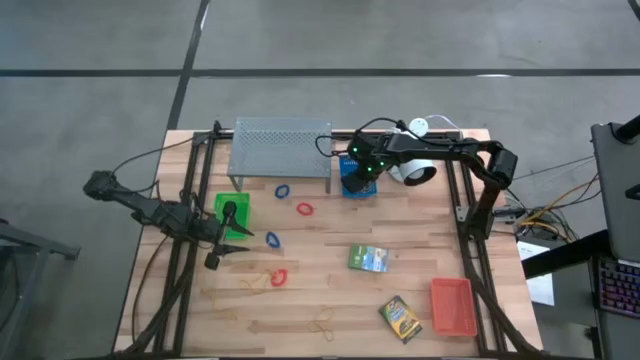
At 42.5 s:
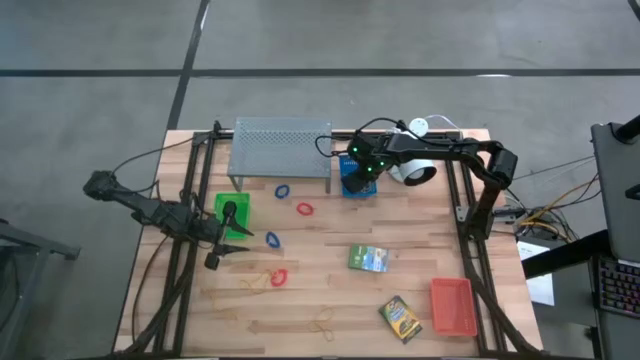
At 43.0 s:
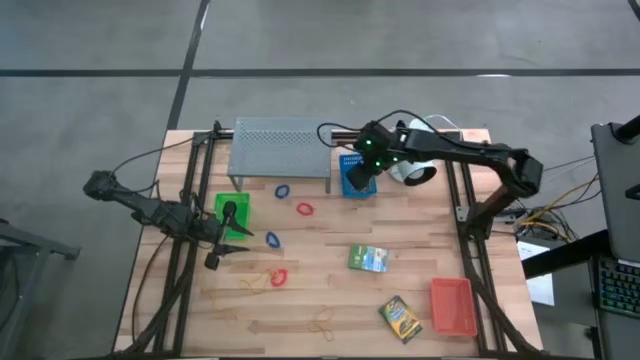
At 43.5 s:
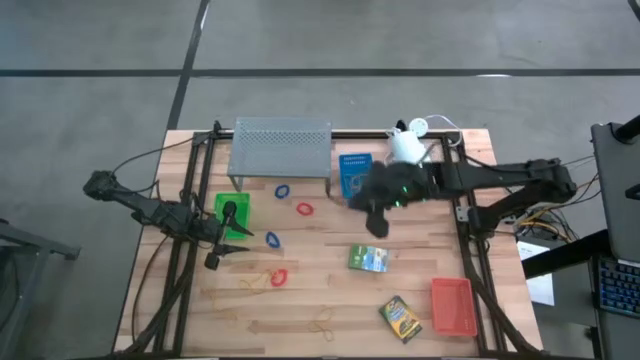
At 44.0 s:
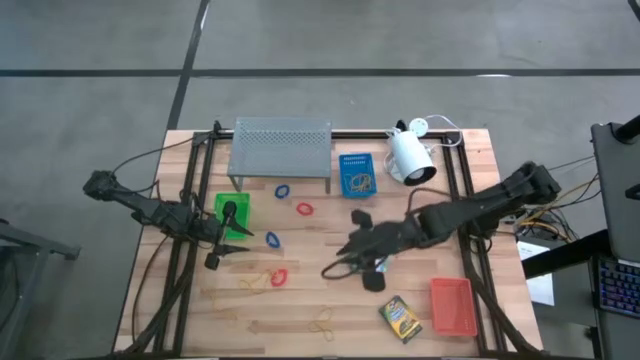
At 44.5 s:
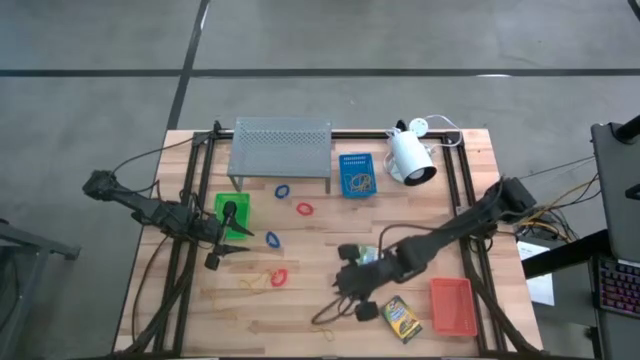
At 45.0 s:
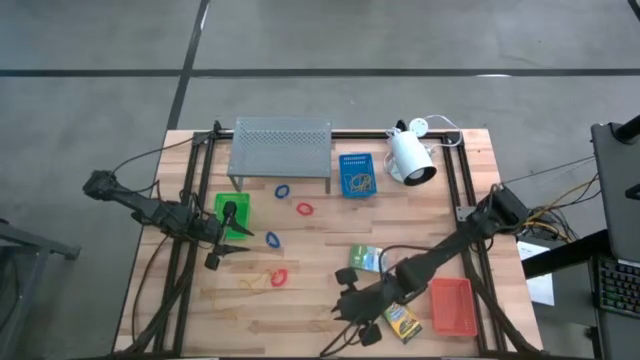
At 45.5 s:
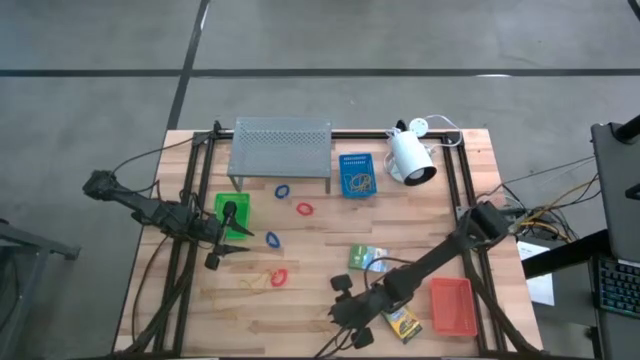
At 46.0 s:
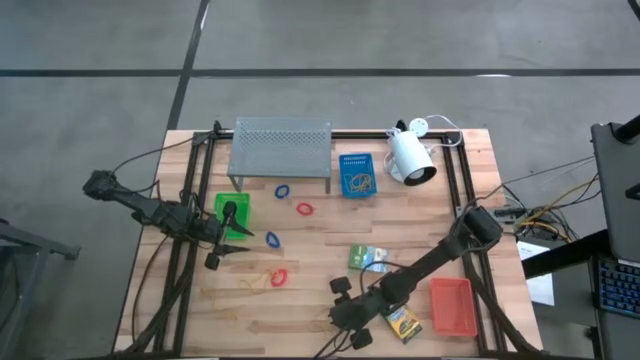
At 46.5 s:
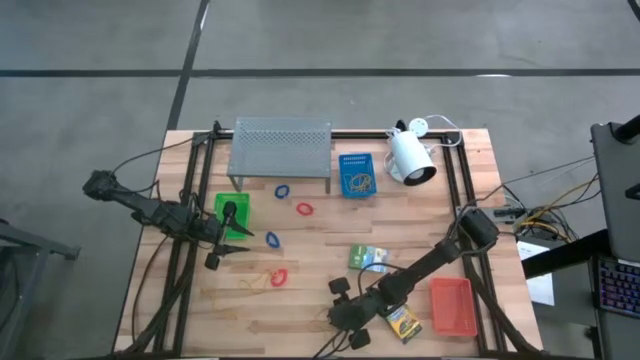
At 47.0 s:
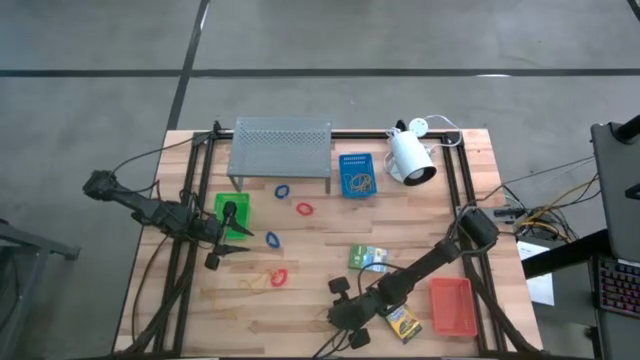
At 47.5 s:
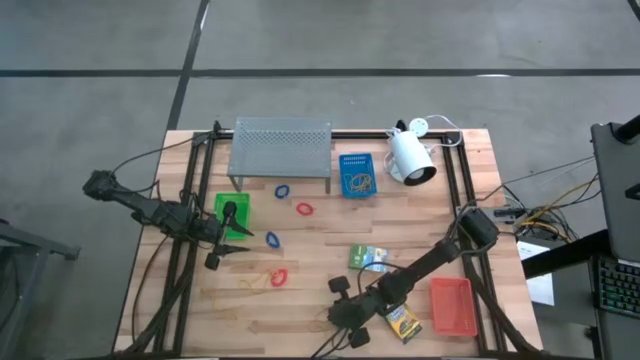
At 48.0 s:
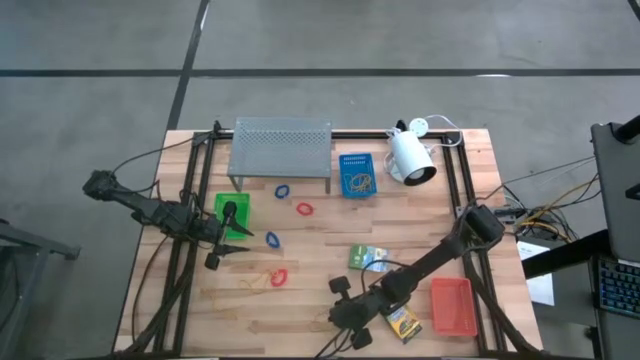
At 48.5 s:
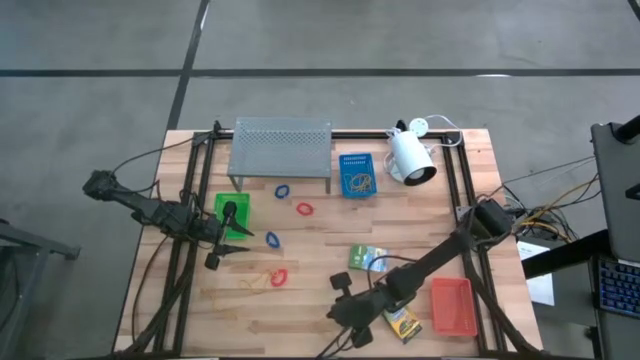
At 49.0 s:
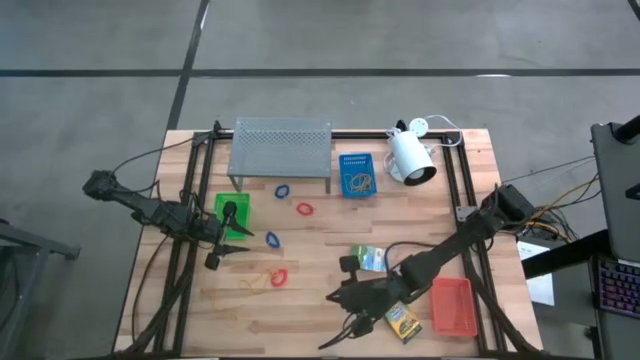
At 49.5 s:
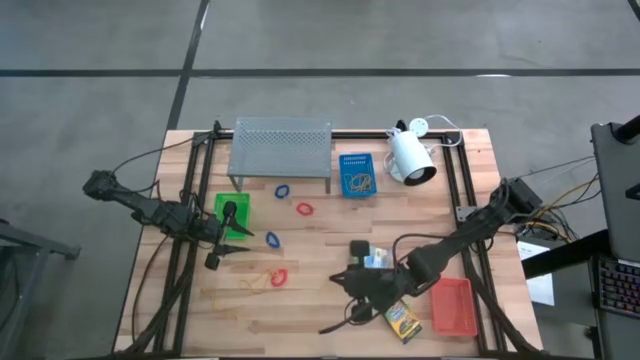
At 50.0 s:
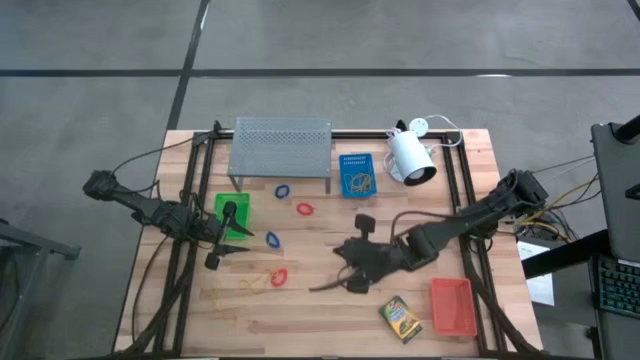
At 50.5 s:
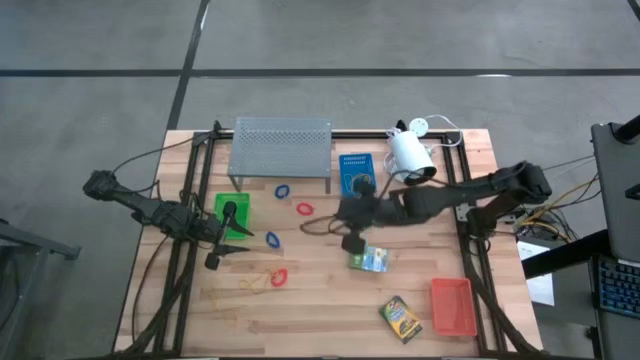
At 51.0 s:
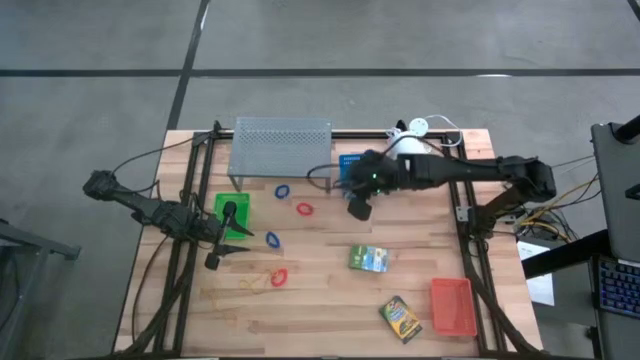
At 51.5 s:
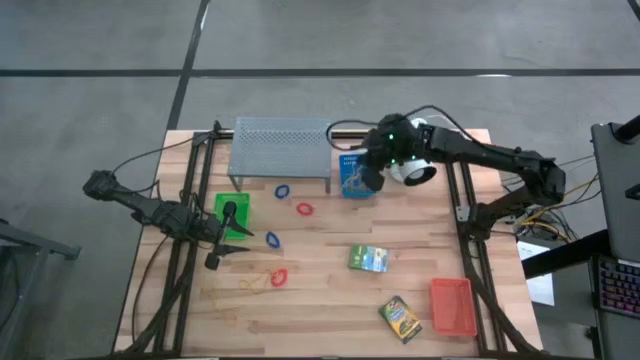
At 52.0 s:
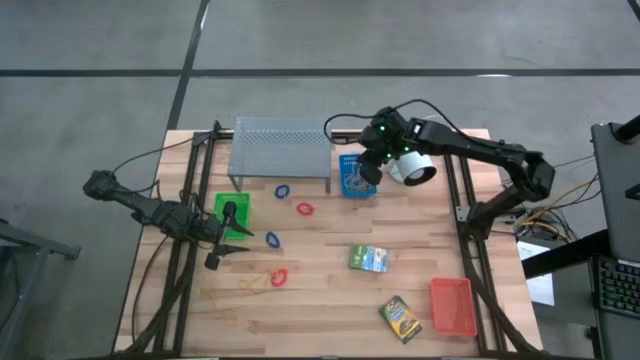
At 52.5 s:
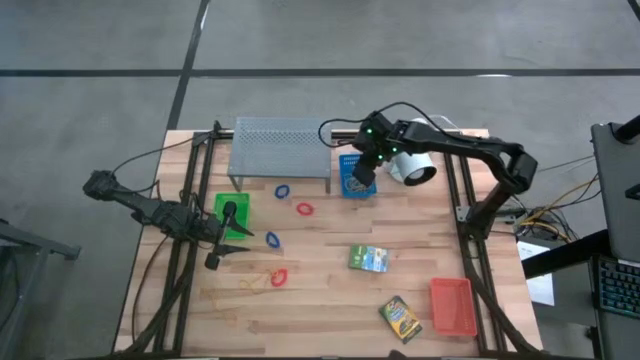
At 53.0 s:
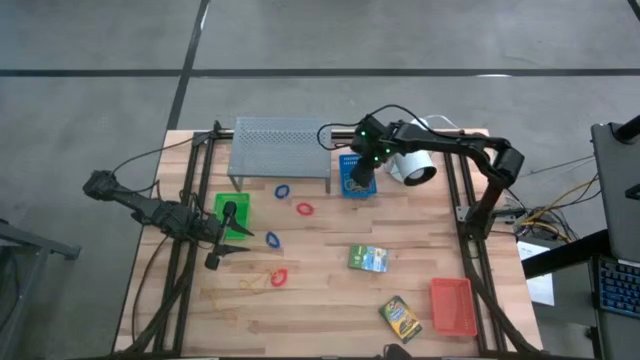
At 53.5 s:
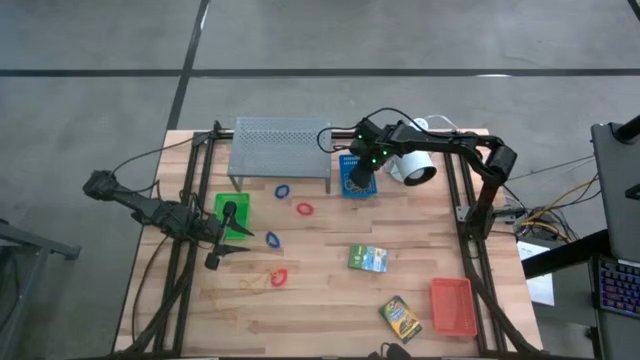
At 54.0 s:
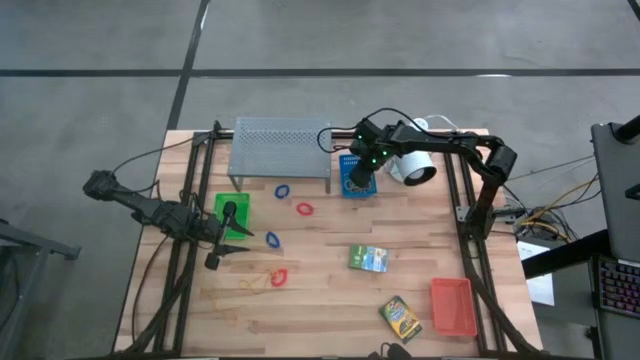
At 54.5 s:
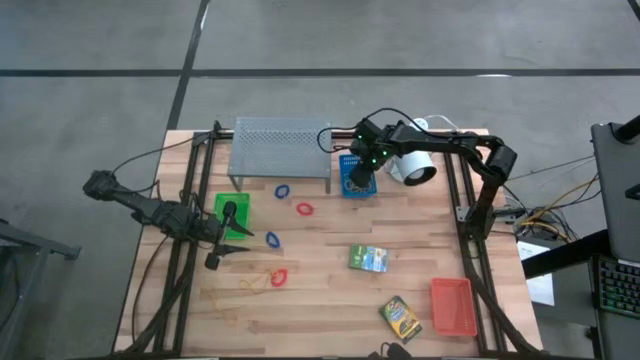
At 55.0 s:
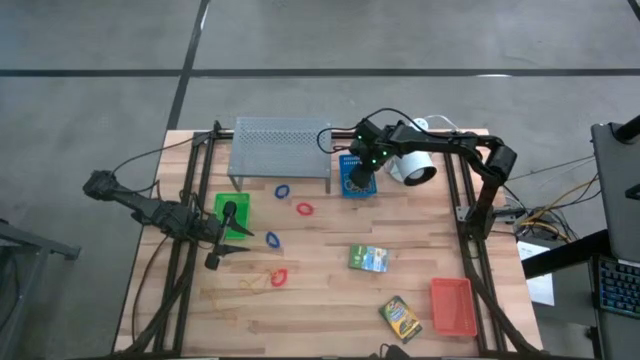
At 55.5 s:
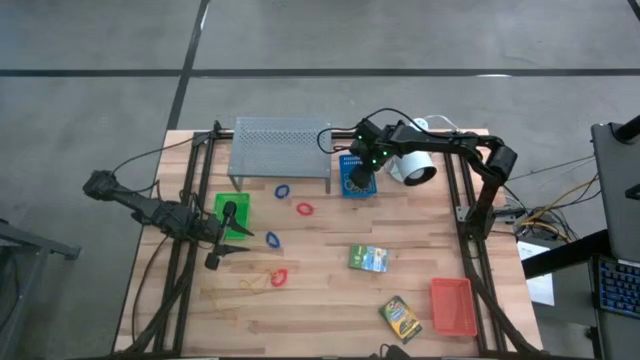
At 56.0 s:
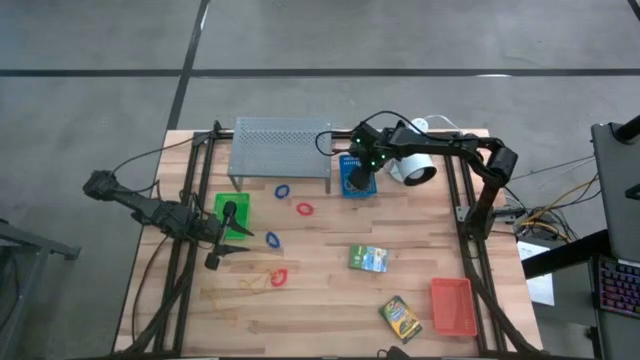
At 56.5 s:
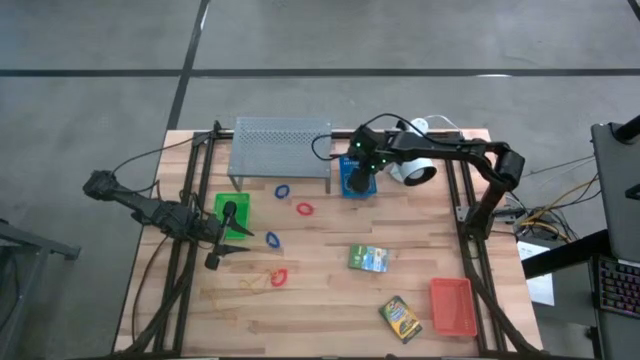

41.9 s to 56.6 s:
Task: Pick & Place Office Desk Supplies
Put the yellow rubber band into the blue bin

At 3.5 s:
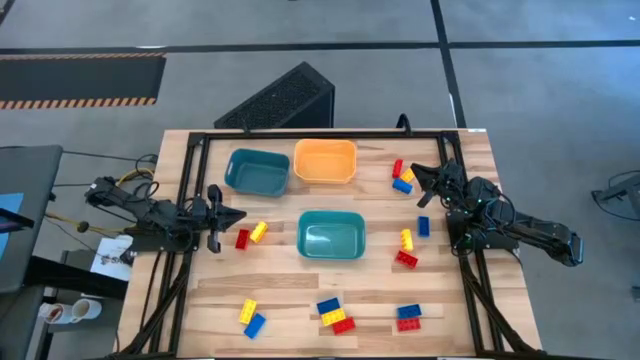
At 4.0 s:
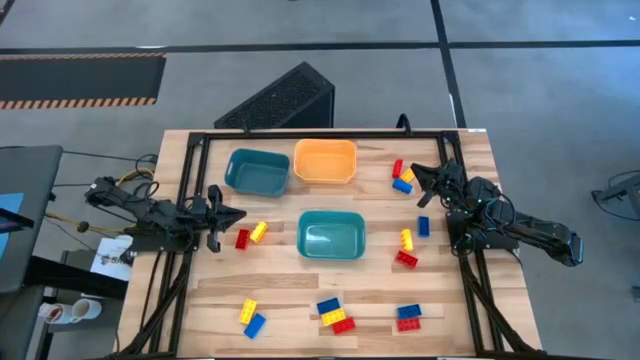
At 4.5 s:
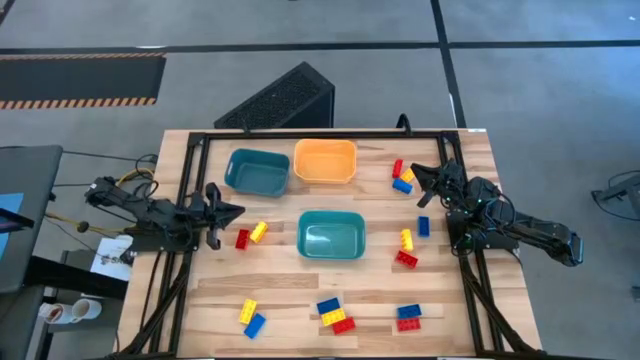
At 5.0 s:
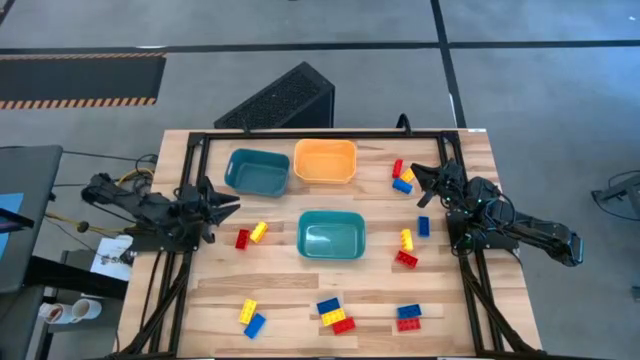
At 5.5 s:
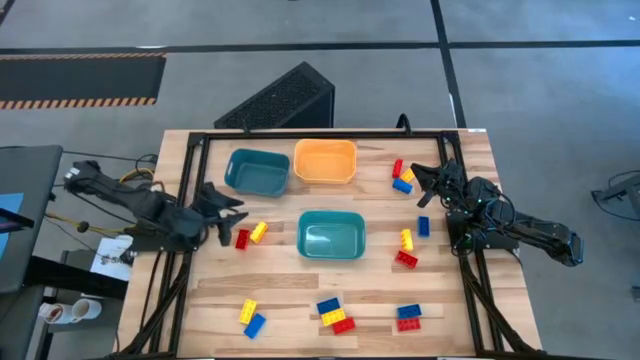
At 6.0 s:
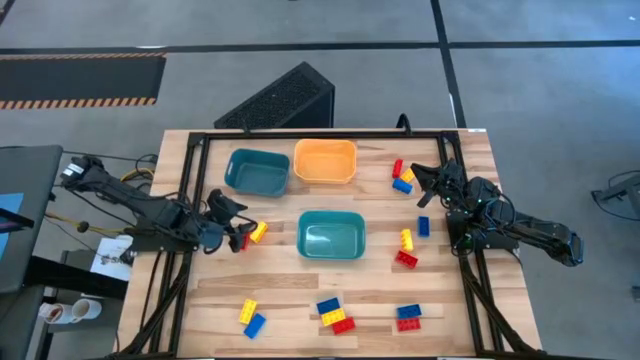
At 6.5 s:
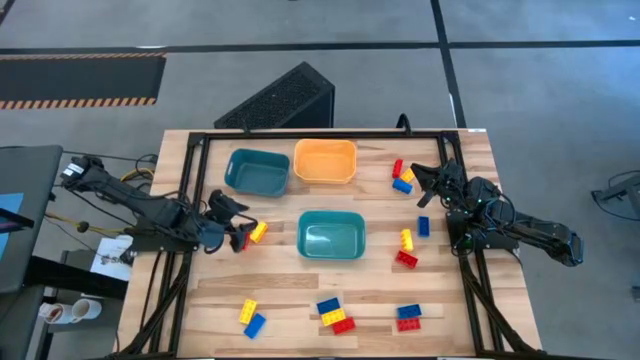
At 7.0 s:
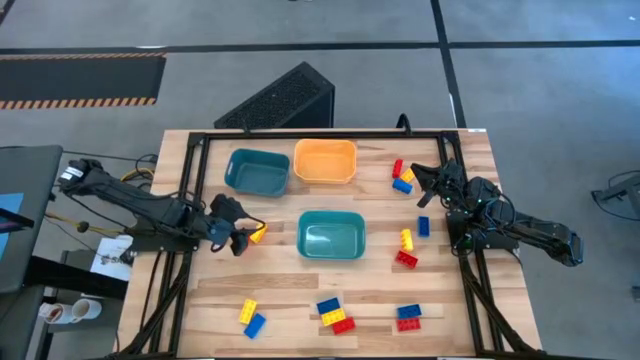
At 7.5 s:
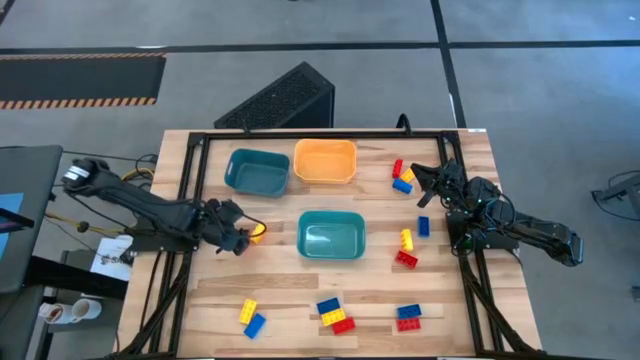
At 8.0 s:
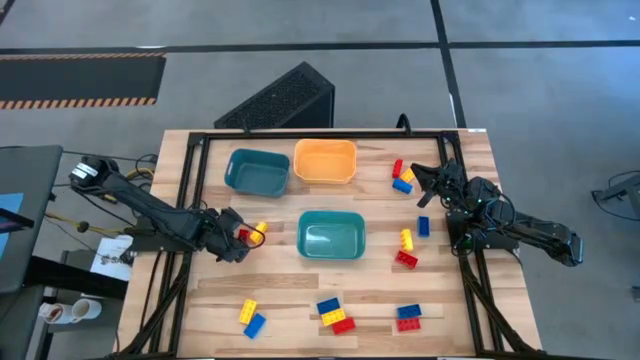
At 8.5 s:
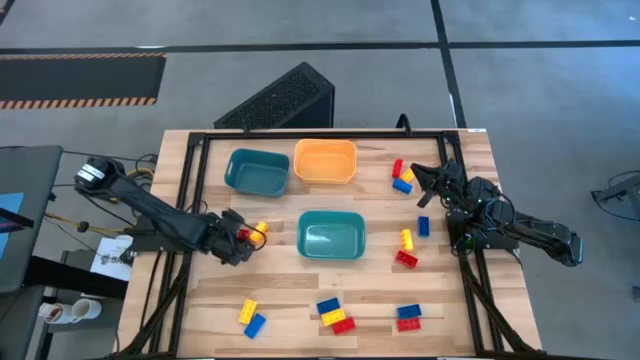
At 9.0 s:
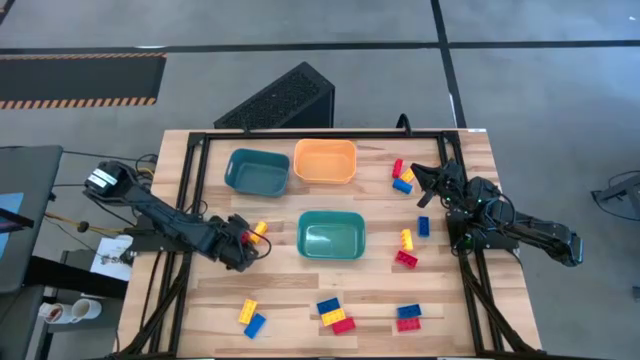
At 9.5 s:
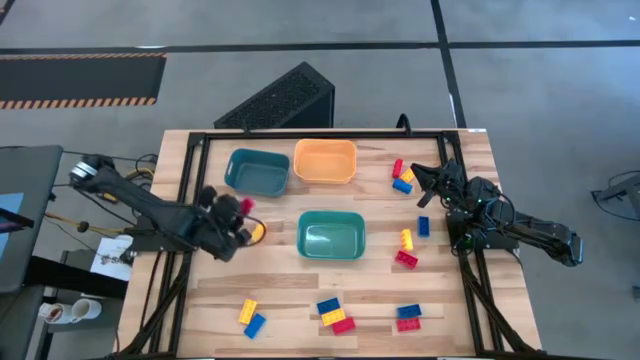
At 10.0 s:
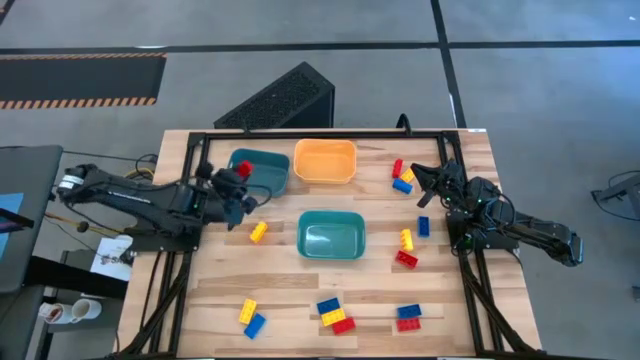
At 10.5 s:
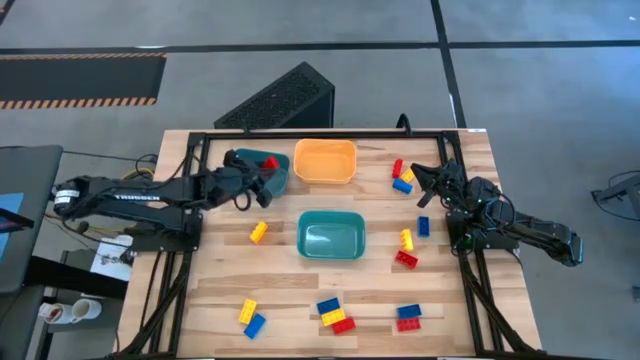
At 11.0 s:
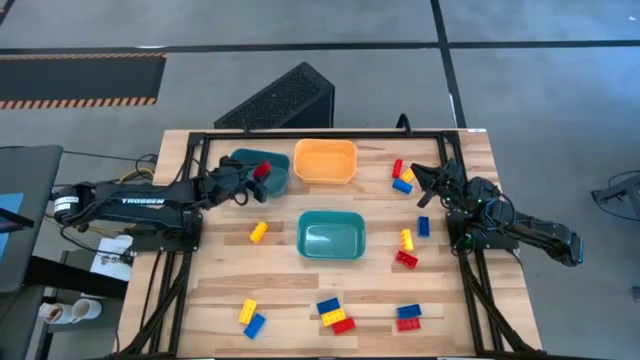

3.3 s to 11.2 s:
Task: Sort & place blocks by color
Put the red game piece into the blue bin
